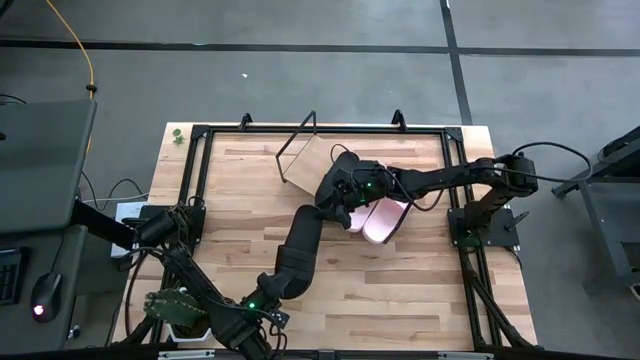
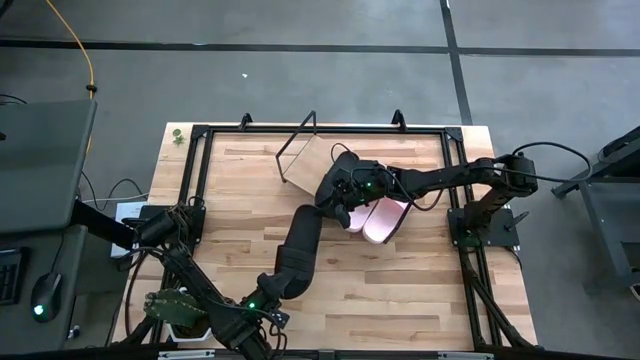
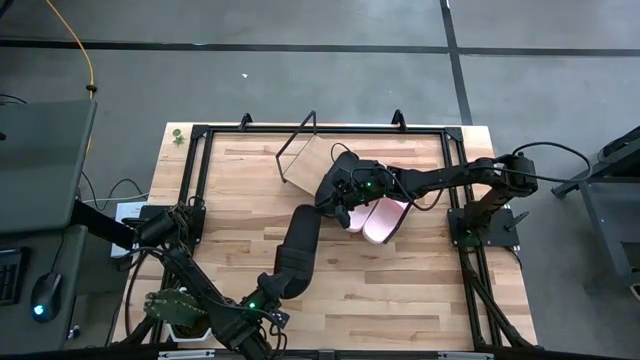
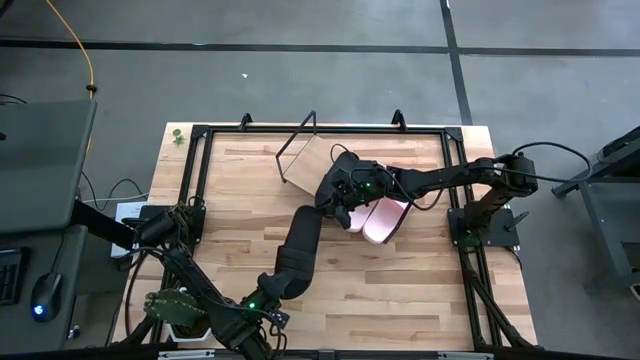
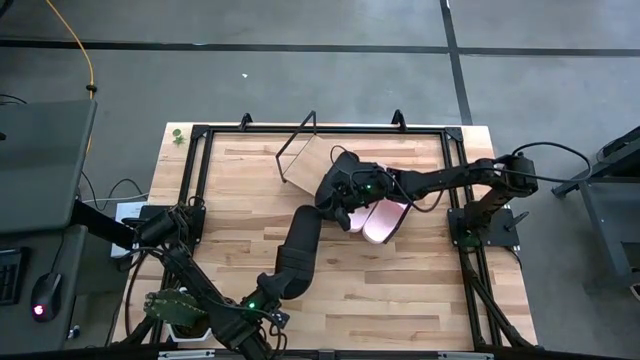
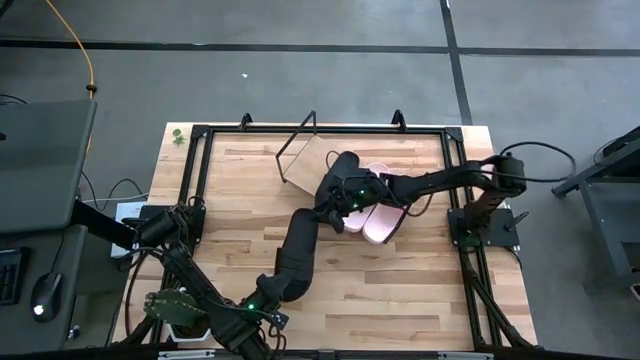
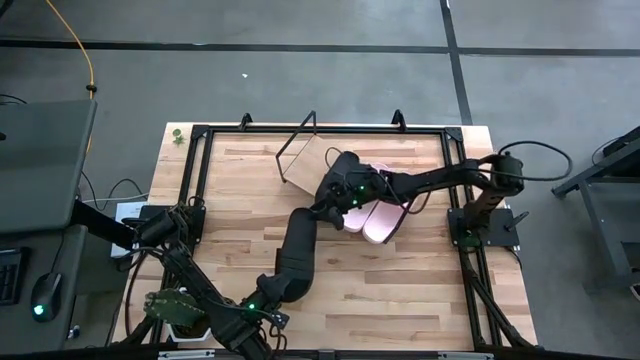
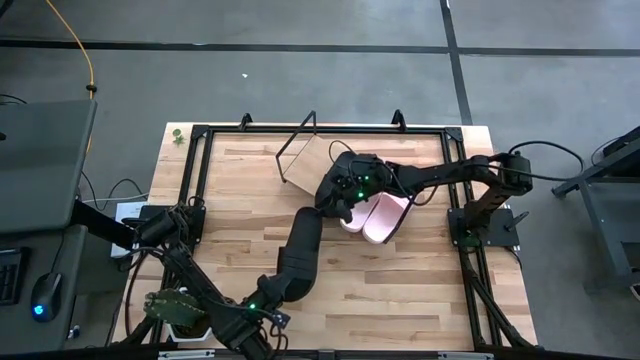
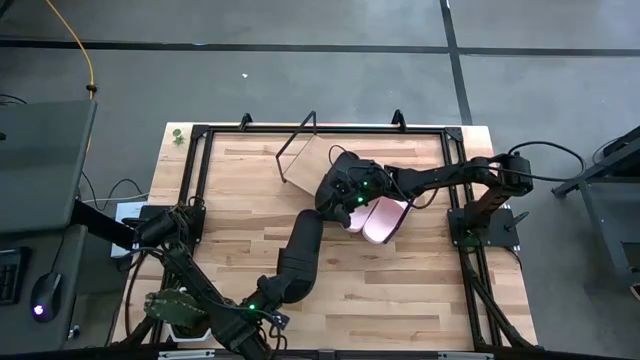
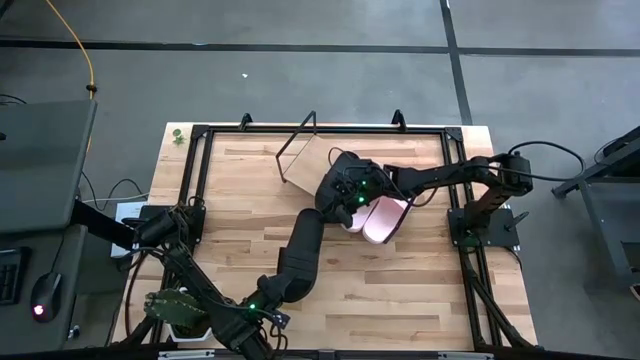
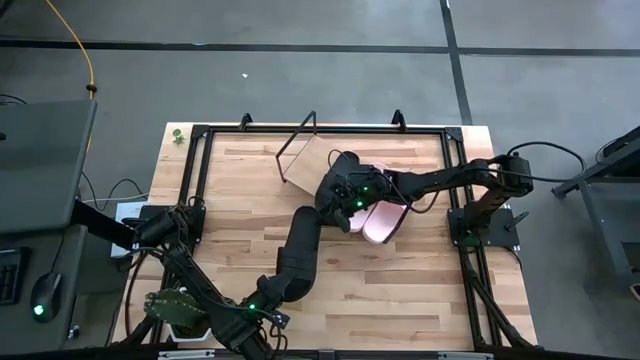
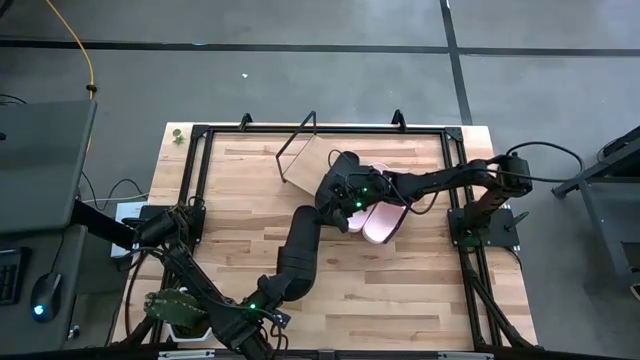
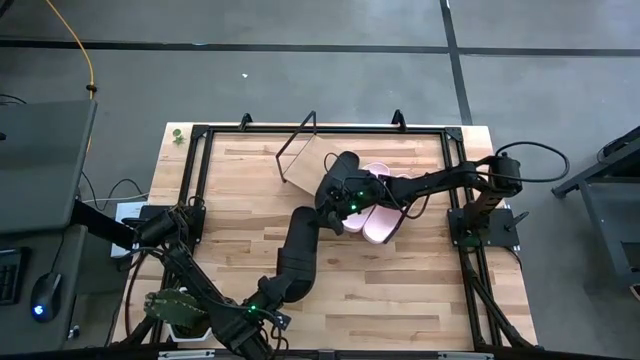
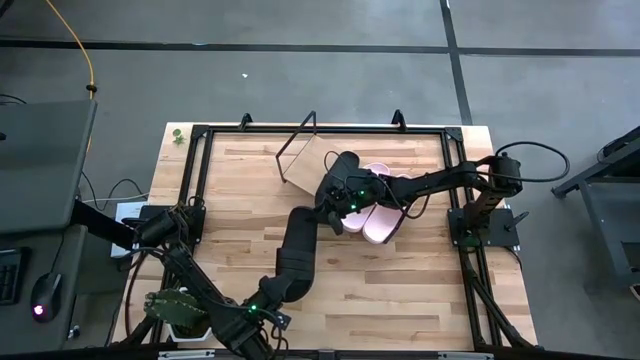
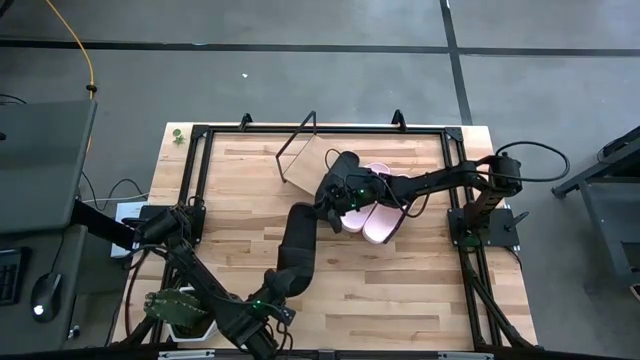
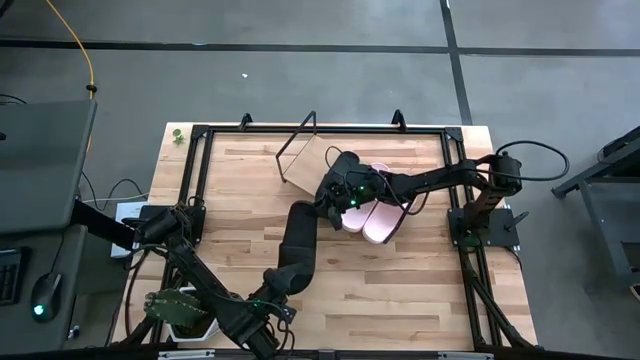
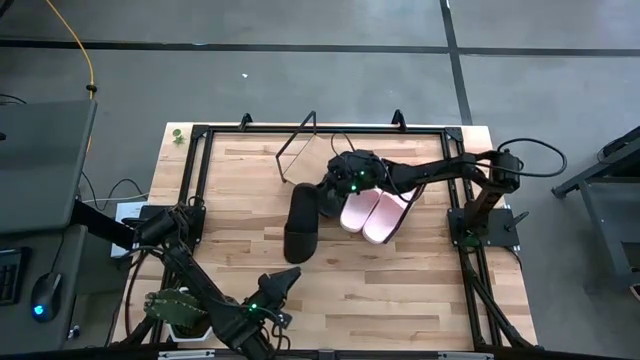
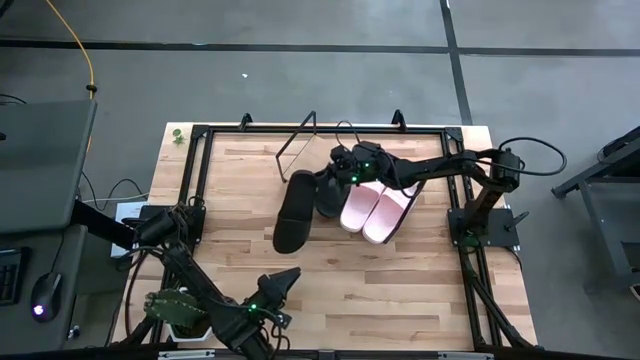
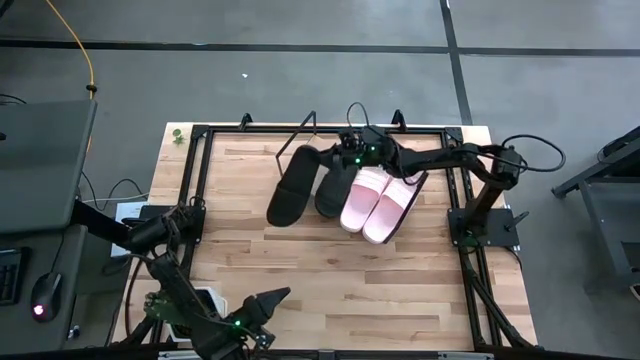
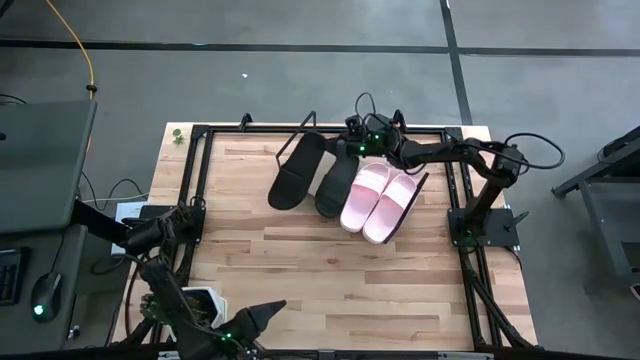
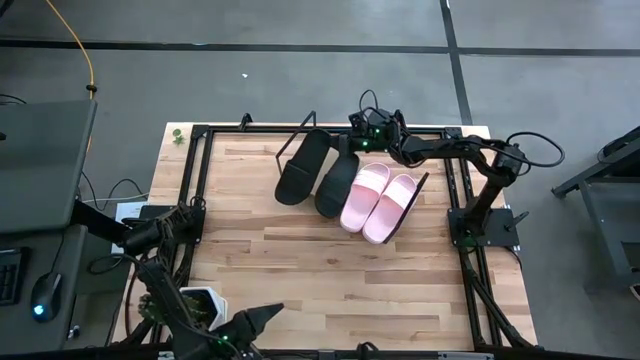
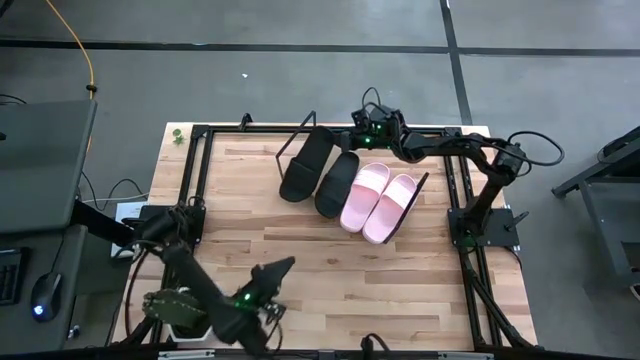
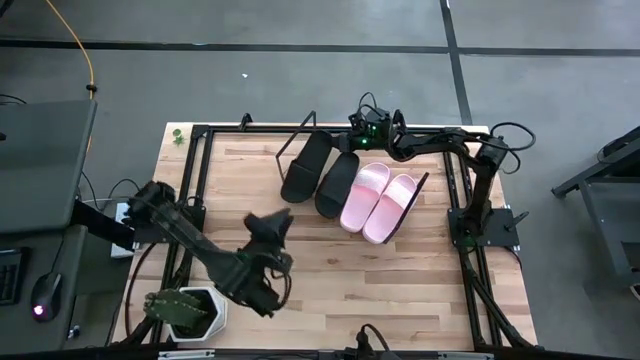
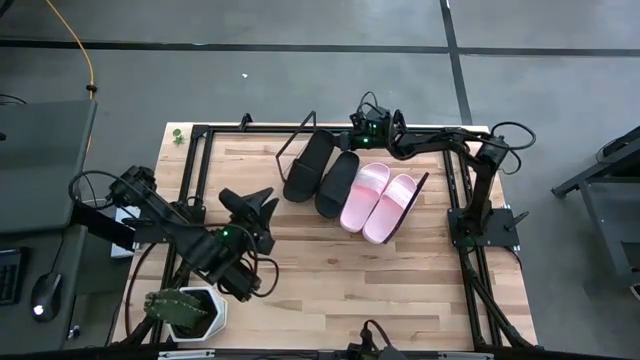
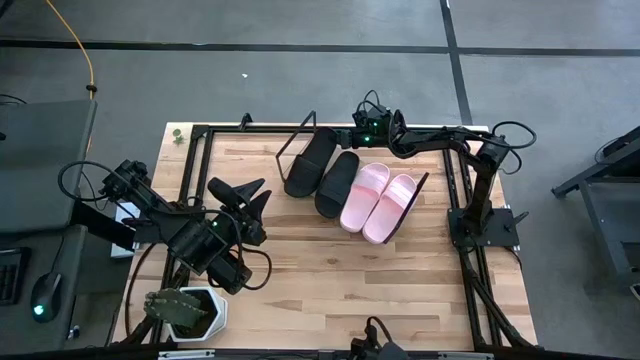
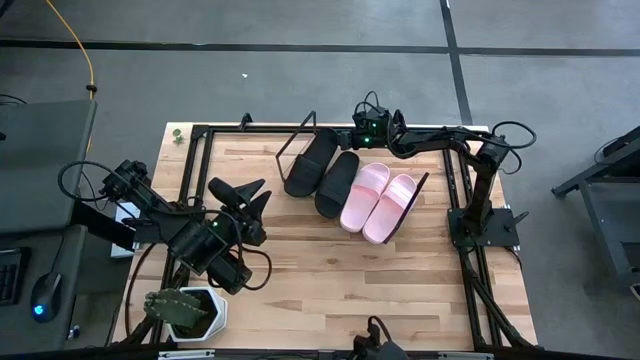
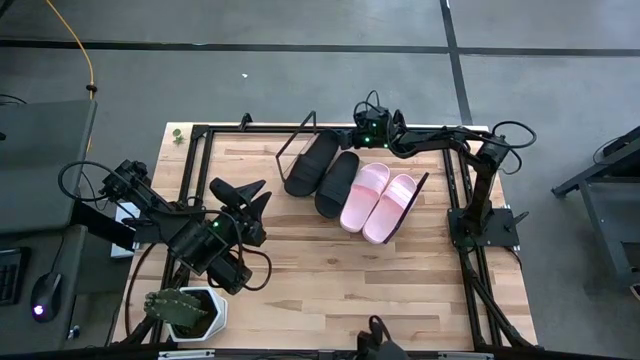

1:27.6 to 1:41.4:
Task: Pick and place slides into the shelf
Put the black slide to the shelf

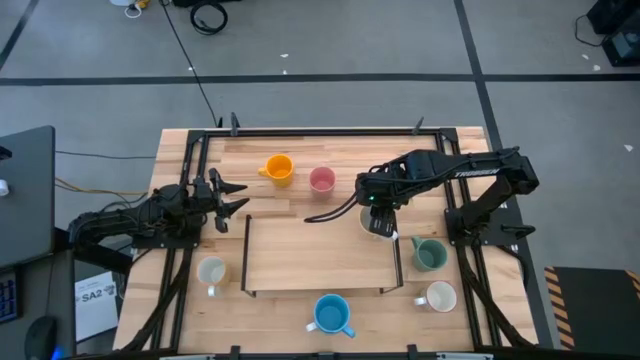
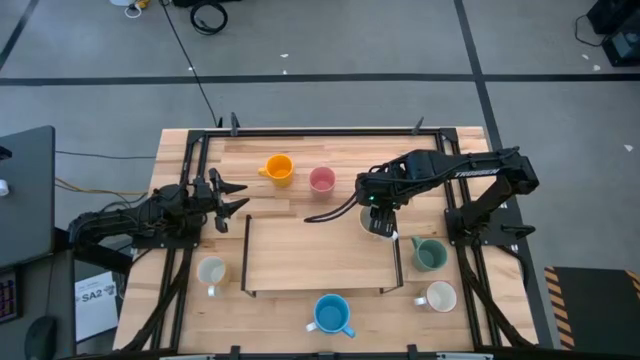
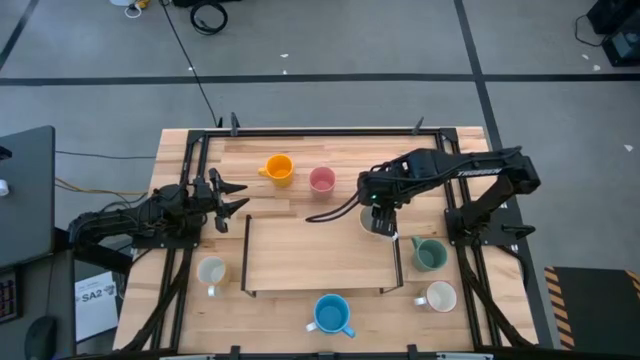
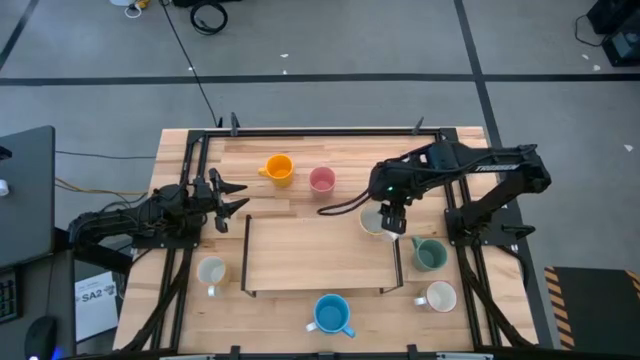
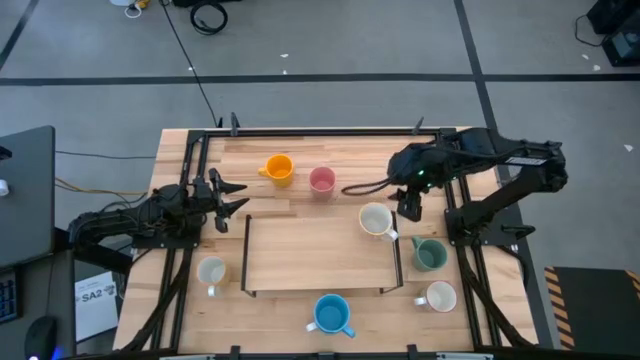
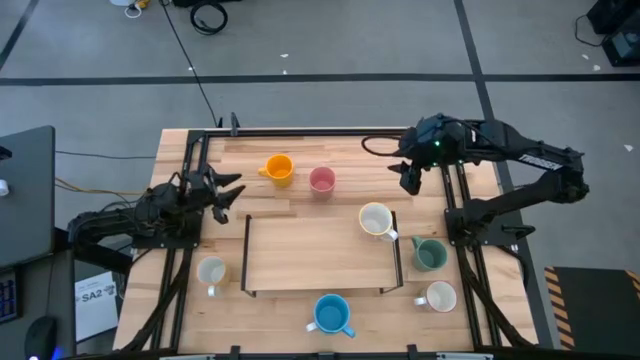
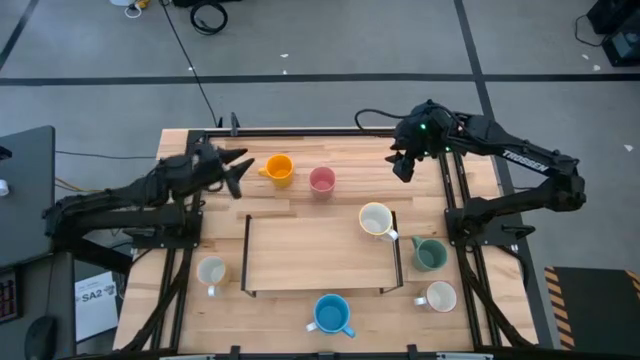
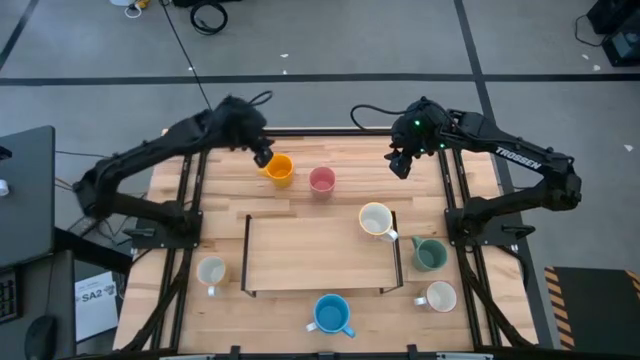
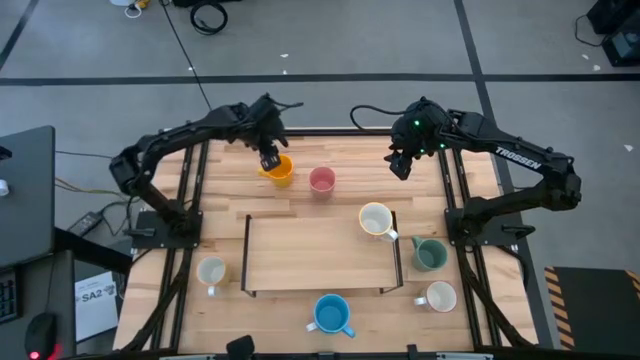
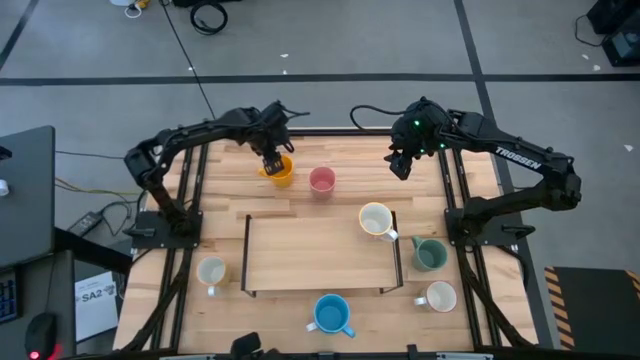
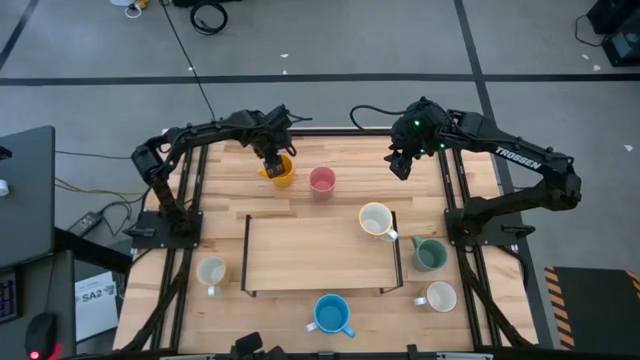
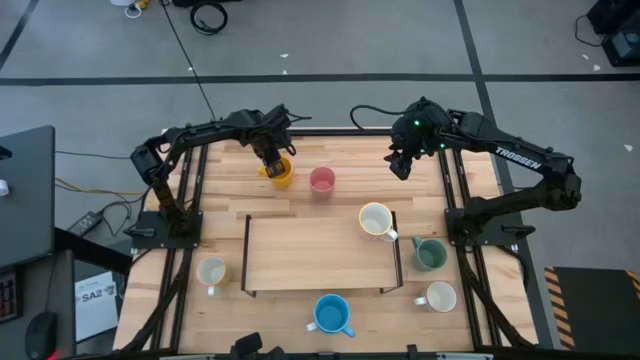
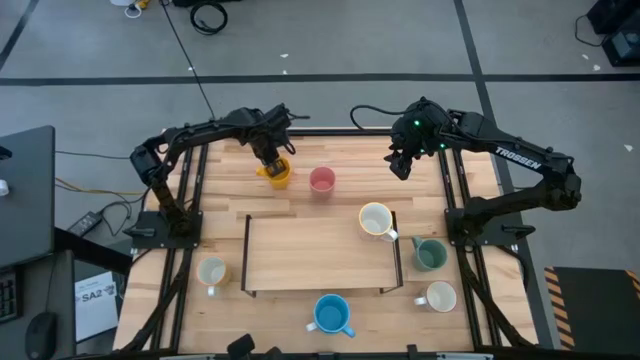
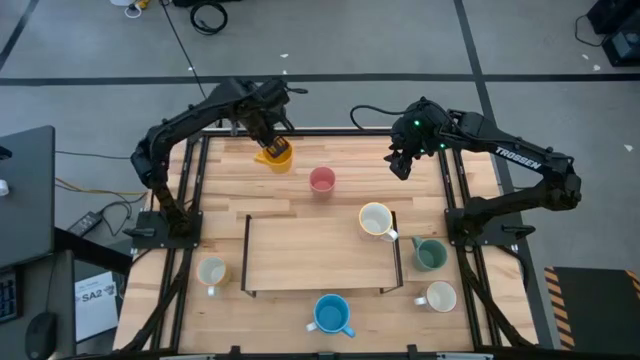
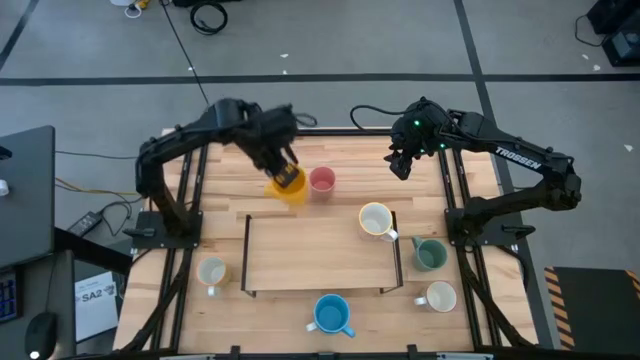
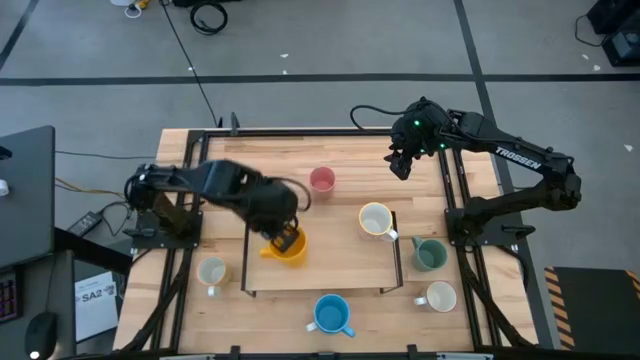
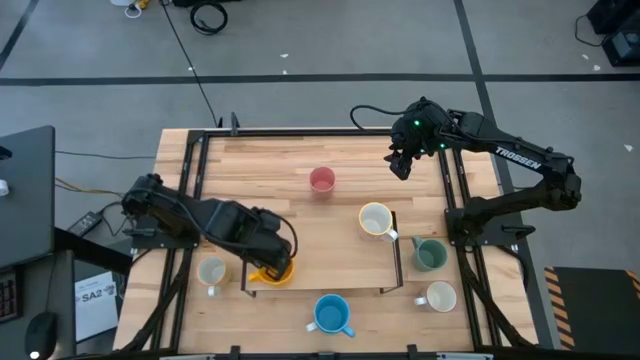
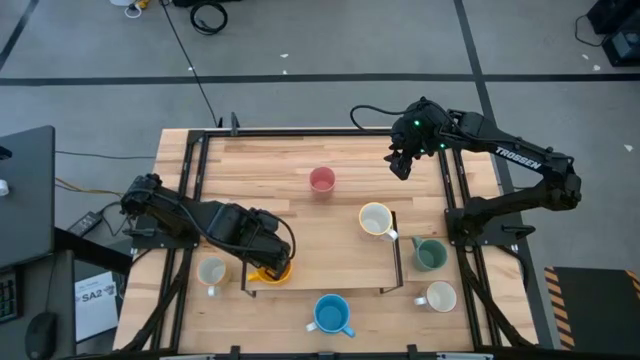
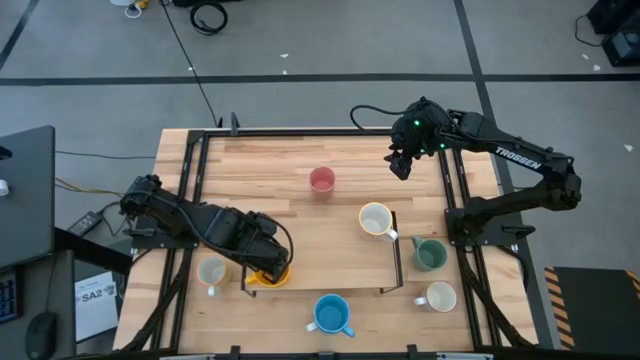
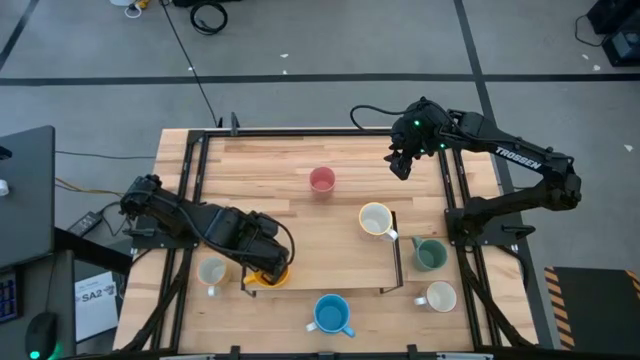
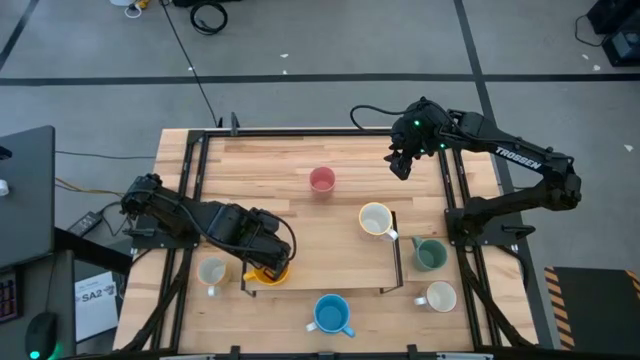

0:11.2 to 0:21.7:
Task: Place coffee mugs
Put the yellow mug on the shelf
